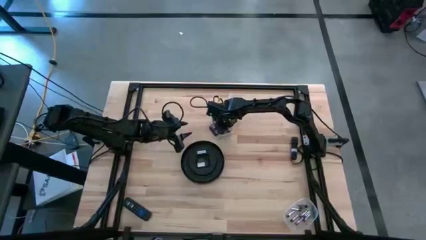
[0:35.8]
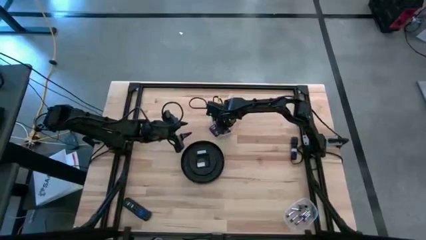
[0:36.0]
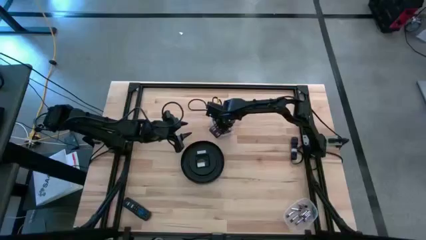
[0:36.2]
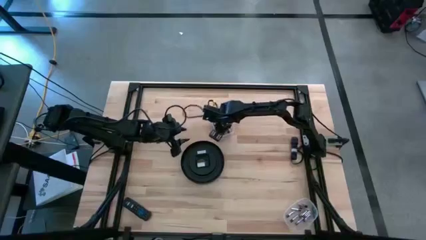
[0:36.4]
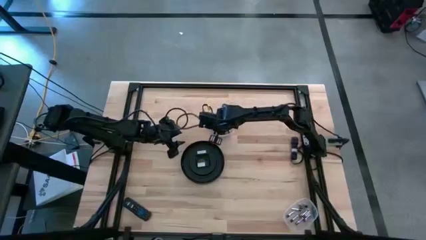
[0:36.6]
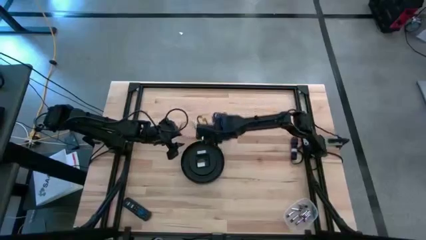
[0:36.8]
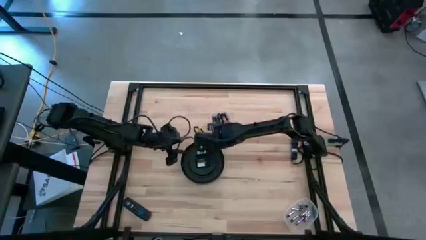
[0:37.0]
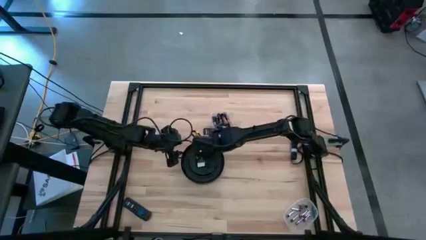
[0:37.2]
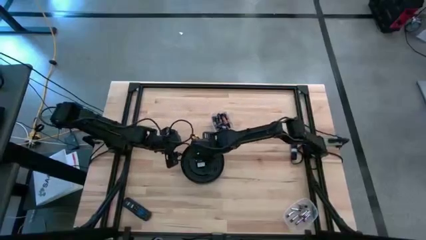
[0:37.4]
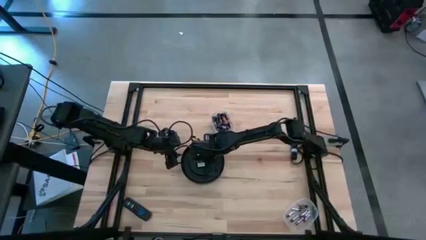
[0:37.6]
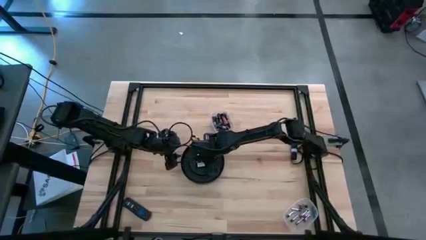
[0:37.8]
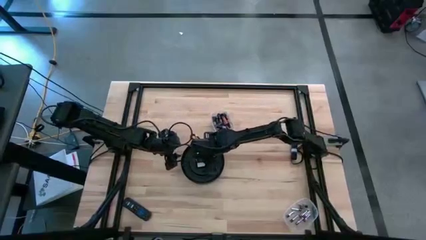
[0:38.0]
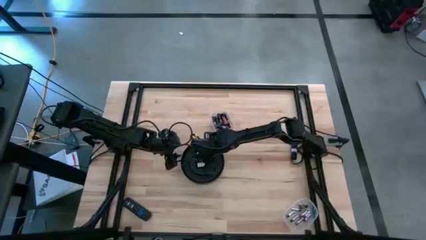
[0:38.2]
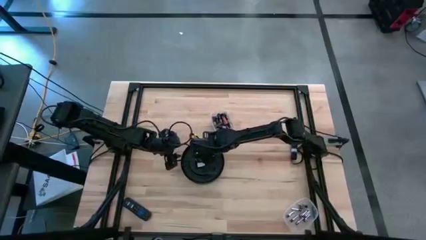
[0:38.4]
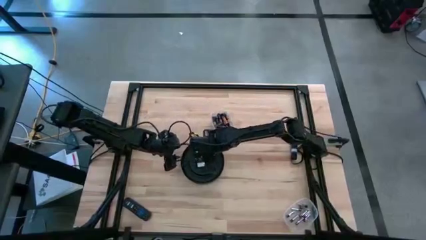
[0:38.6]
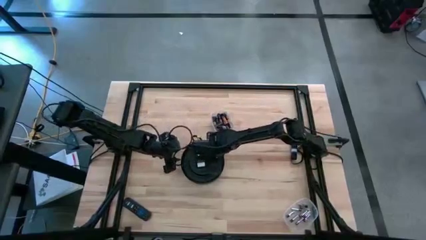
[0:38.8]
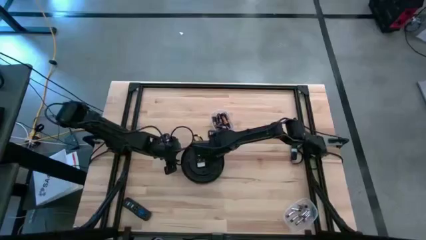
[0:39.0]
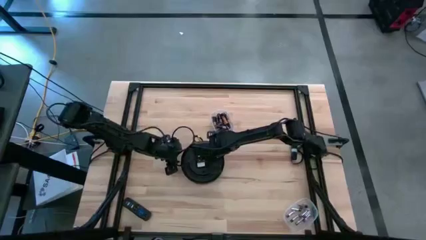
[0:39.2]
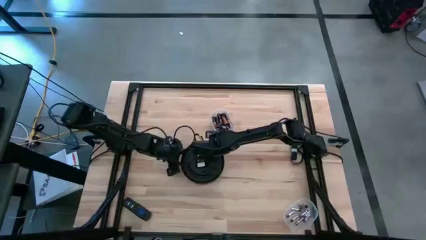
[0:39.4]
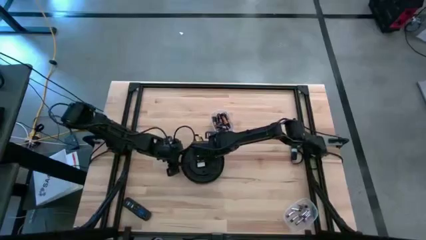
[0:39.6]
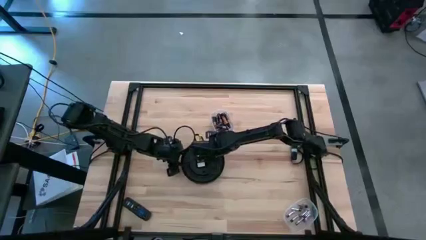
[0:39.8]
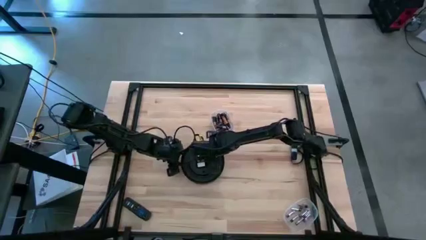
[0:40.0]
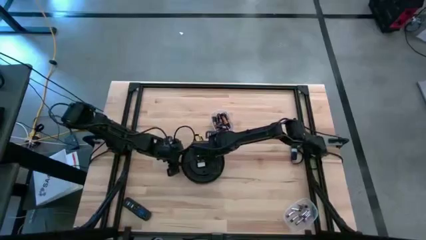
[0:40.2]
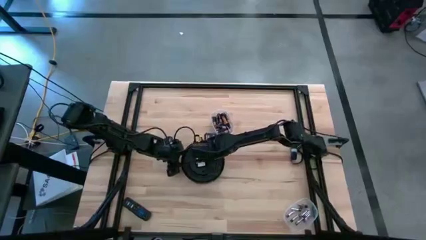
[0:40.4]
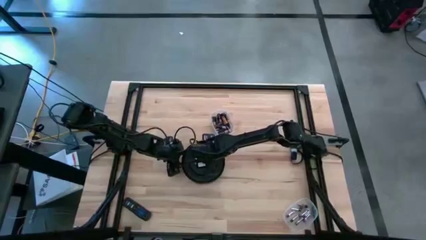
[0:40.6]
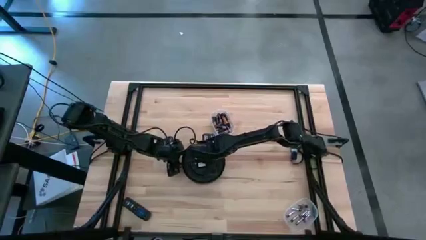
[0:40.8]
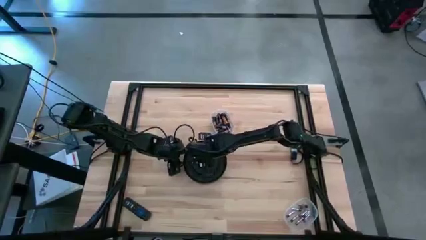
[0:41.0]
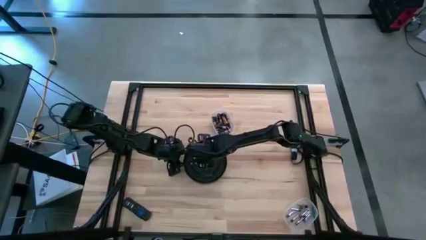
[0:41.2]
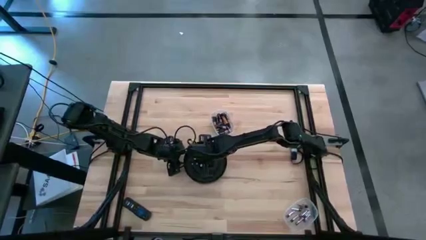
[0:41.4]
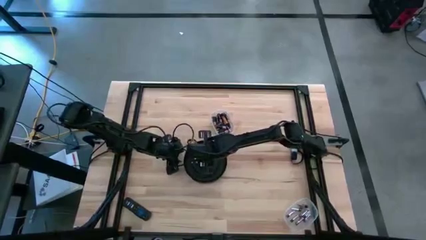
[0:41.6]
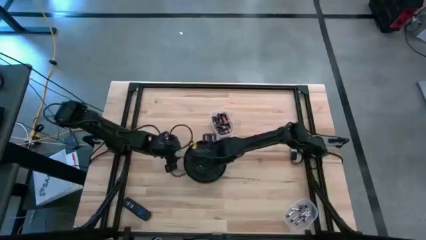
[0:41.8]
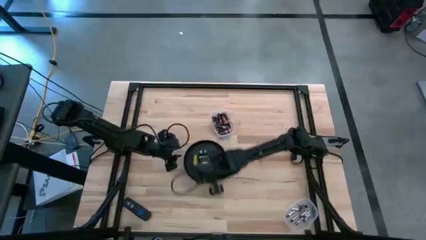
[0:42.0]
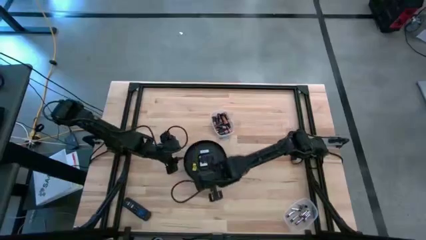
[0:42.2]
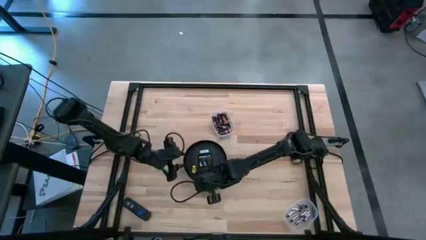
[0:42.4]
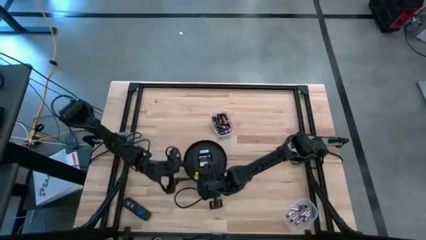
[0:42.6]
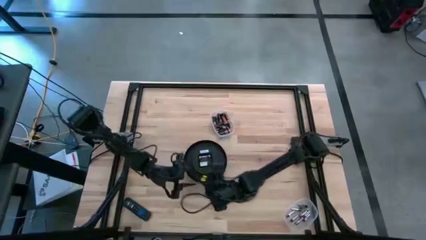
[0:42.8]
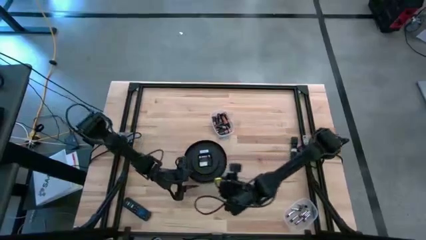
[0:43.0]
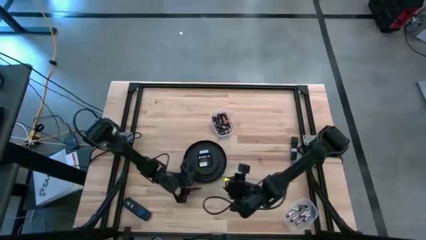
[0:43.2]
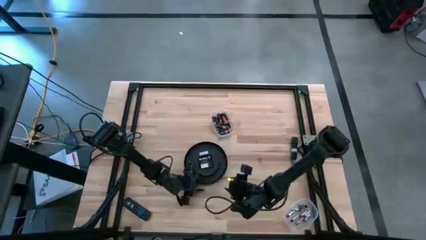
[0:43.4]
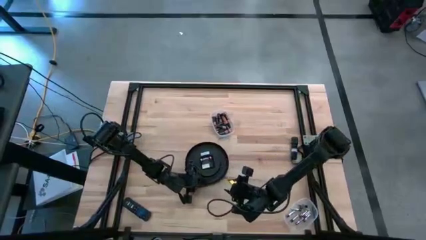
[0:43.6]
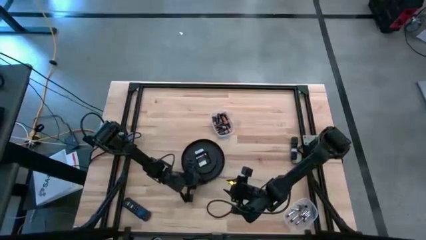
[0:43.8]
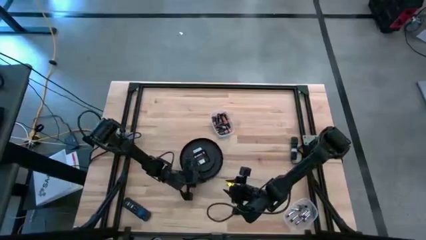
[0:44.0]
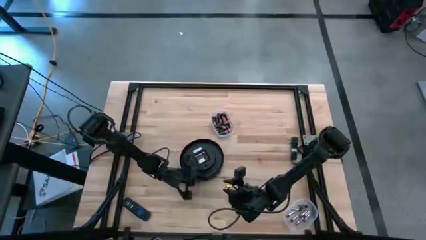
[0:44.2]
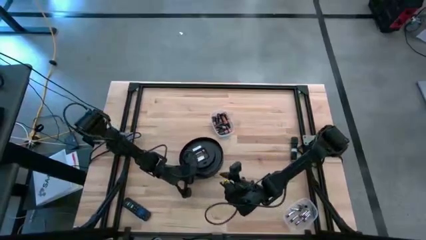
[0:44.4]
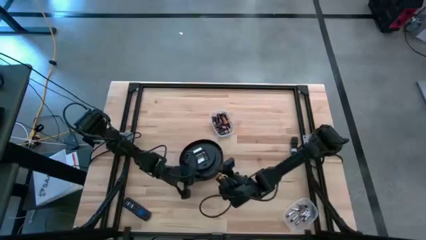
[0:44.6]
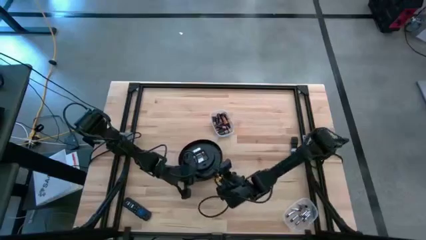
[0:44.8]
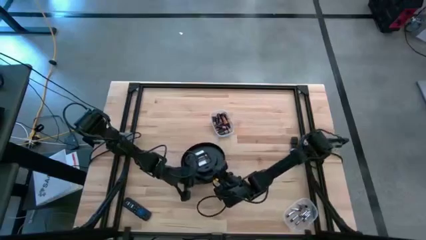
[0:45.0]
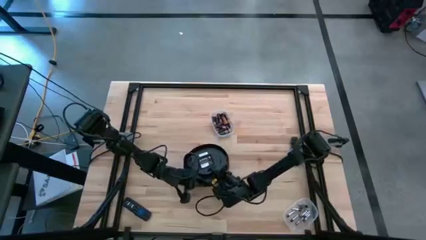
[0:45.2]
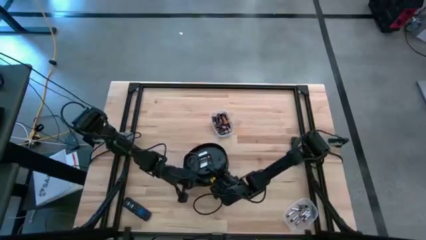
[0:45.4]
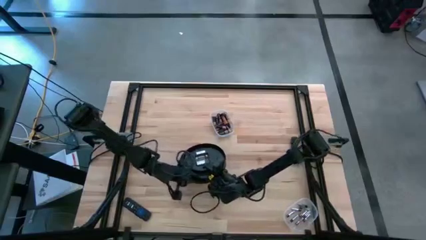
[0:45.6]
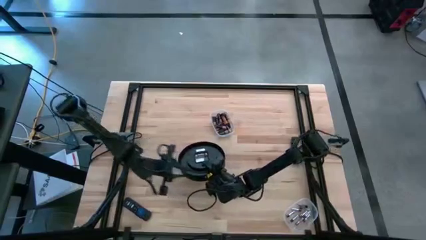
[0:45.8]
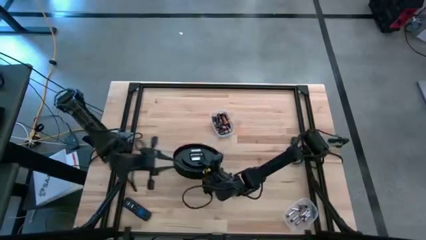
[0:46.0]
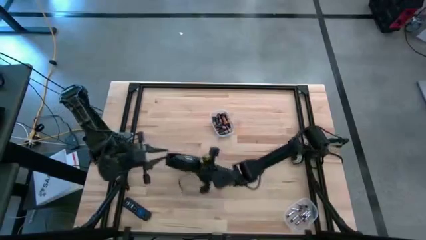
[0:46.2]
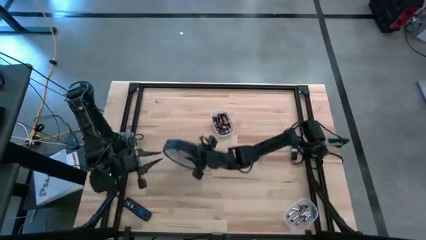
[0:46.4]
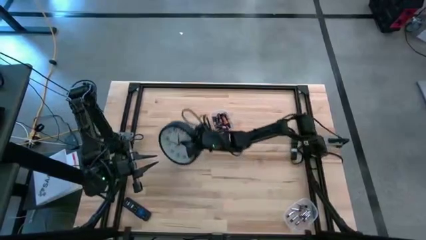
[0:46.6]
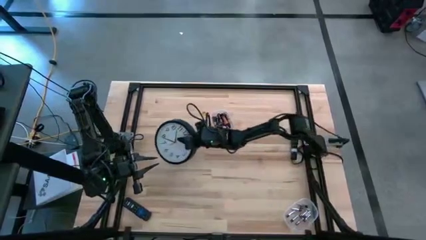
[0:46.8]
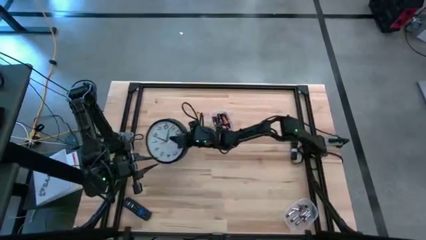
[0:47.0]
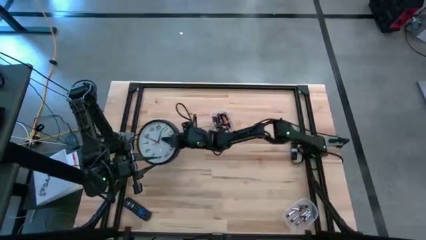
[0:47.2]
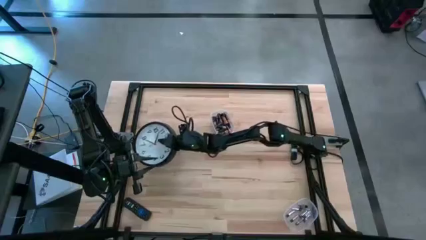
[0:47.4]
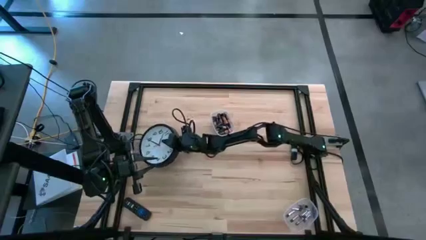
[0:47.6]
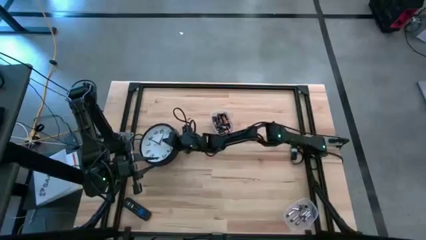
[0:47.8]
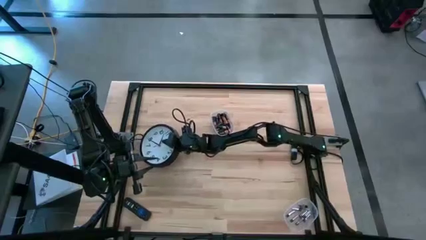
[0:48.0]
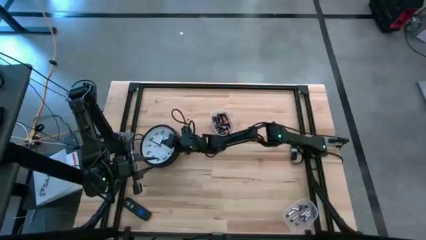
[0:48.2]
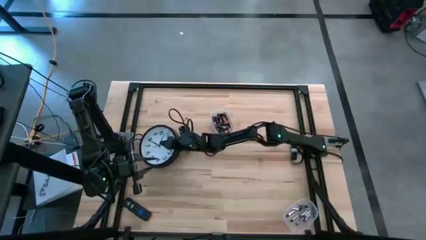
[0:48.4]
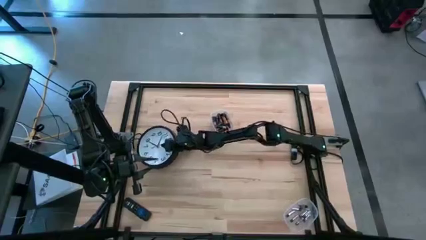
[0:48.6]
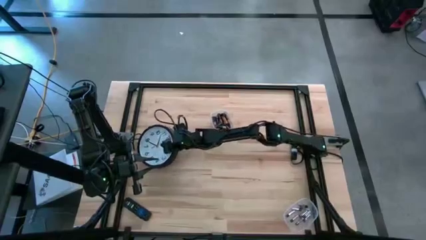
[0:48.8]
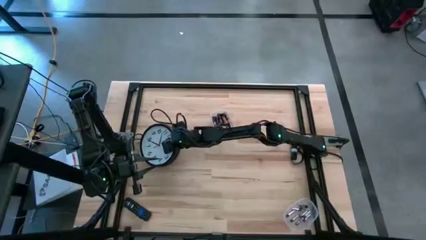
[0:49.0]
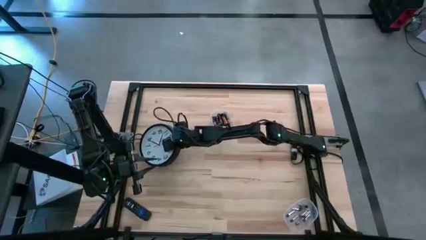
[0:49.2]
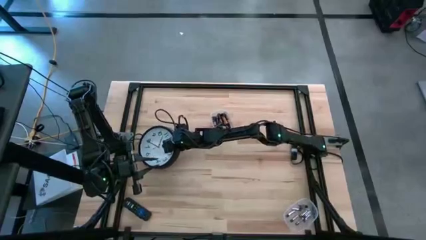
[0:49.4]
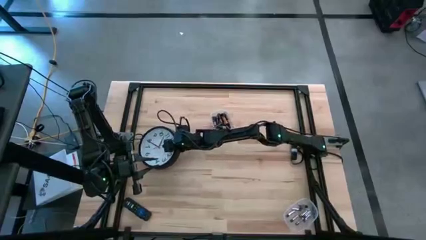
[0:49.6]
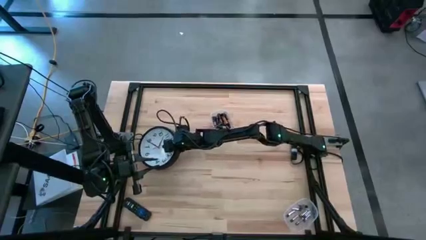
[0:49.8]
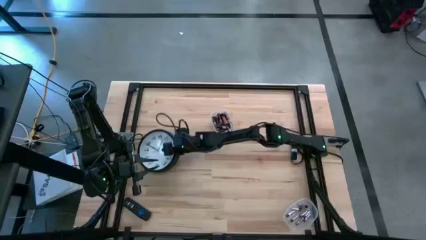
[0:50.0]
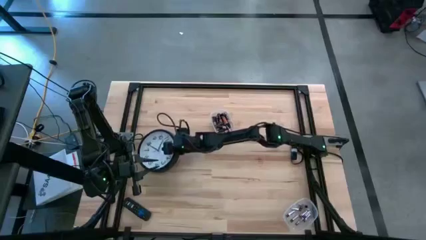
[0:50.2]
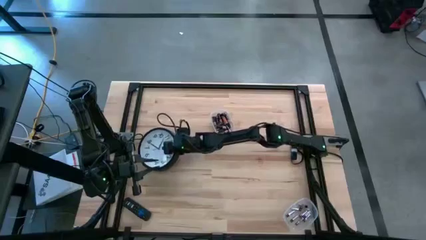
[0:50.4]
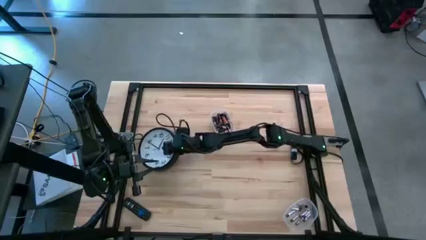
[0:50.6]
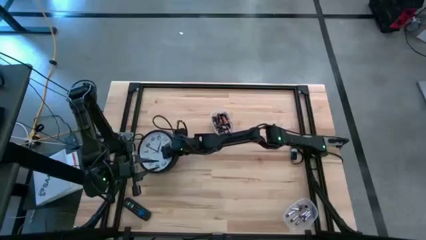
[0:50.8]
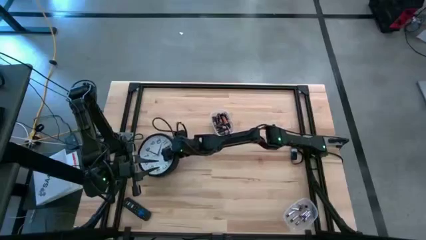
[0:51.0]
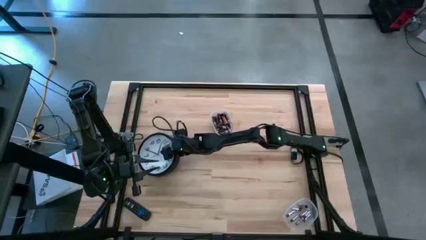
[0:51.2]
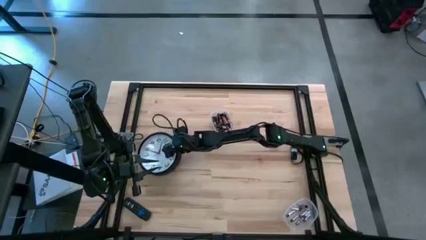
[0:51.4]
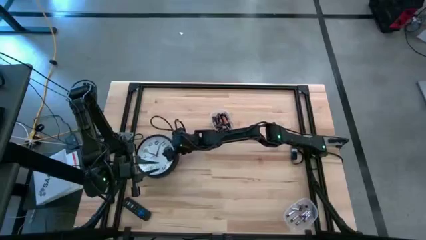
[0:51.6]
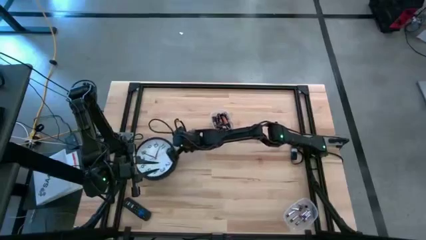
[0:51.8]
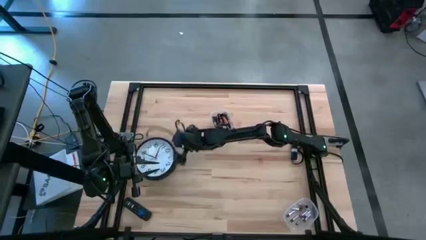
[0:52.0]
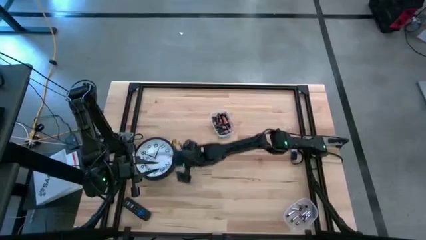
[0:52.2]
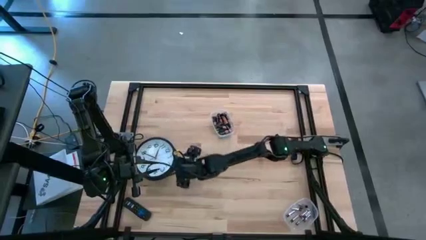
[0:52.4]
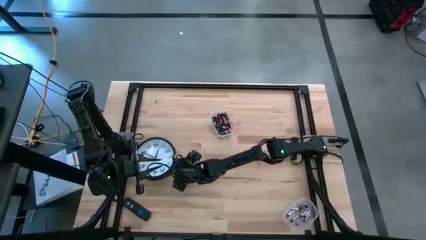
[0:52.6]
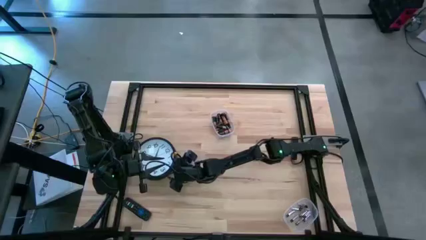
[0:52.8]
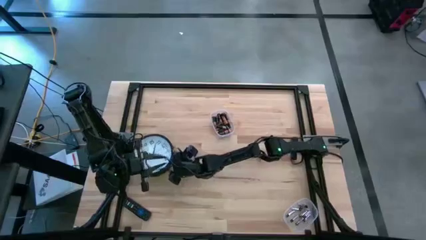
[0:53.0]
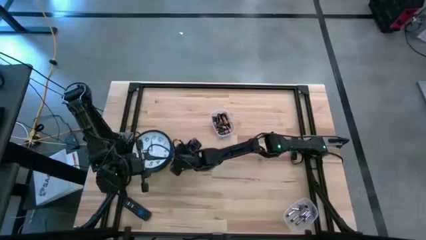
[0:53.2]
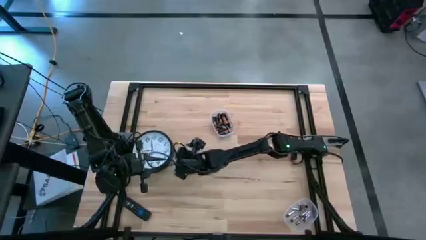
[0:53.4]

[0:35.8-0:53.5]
Task: Insert battery
Insert the black battery into the black clock
